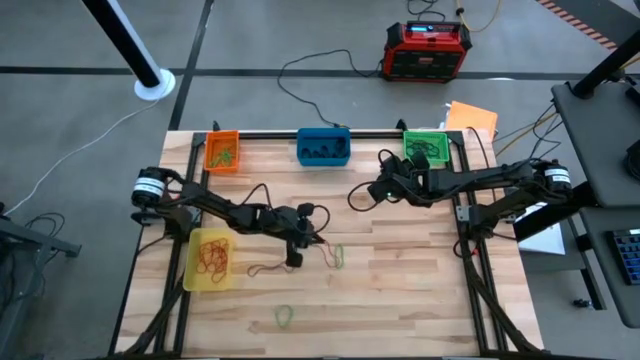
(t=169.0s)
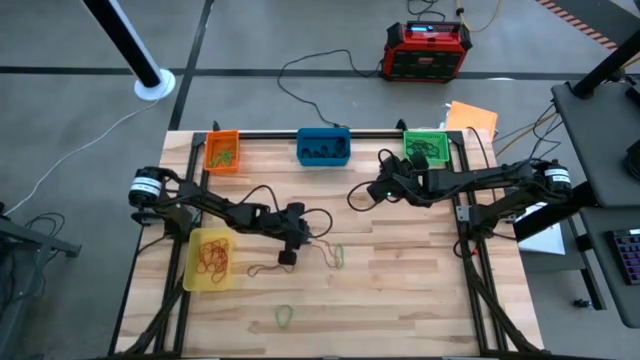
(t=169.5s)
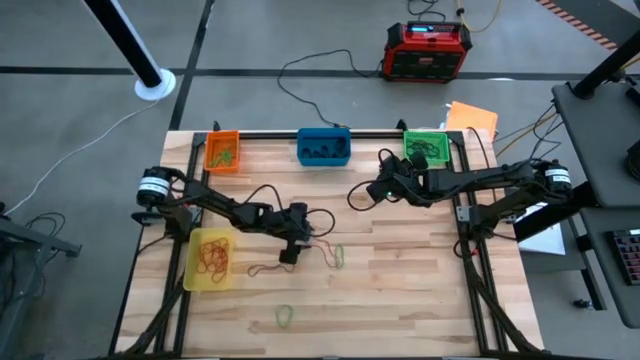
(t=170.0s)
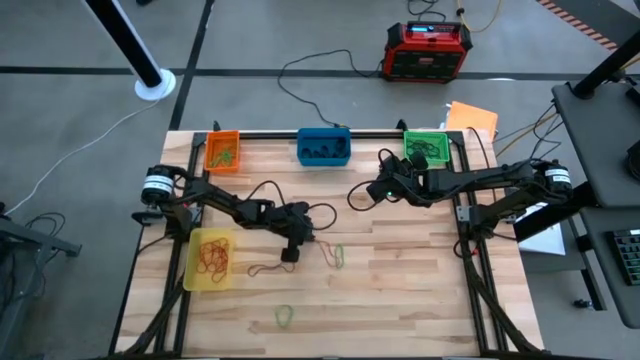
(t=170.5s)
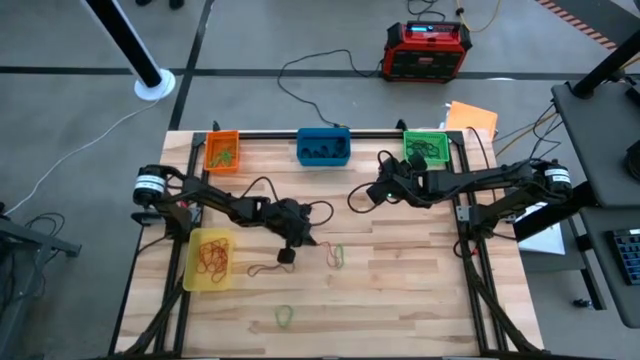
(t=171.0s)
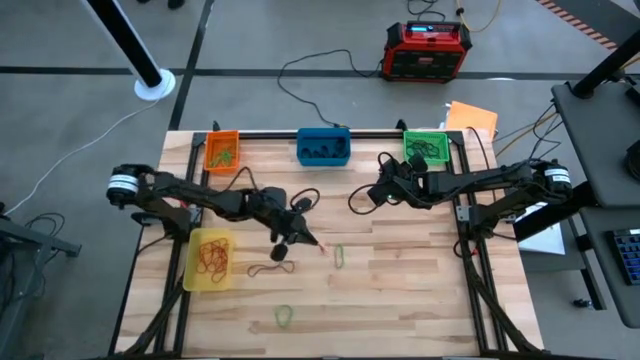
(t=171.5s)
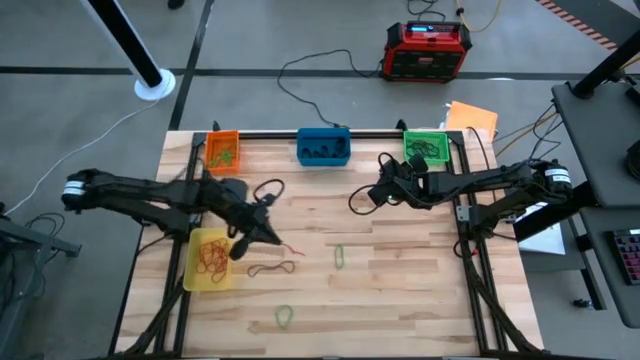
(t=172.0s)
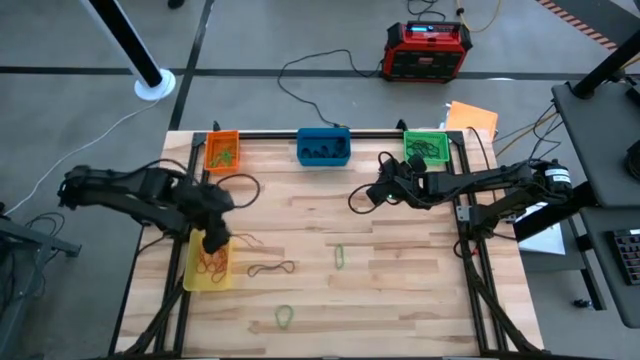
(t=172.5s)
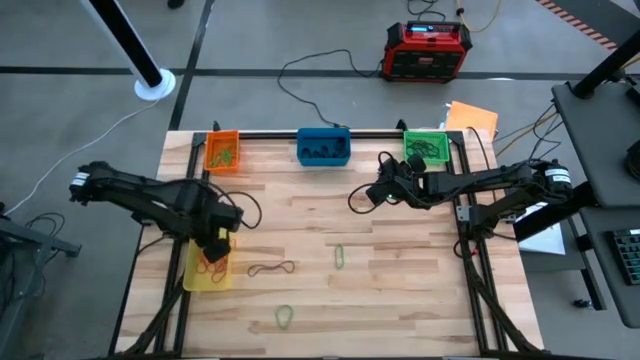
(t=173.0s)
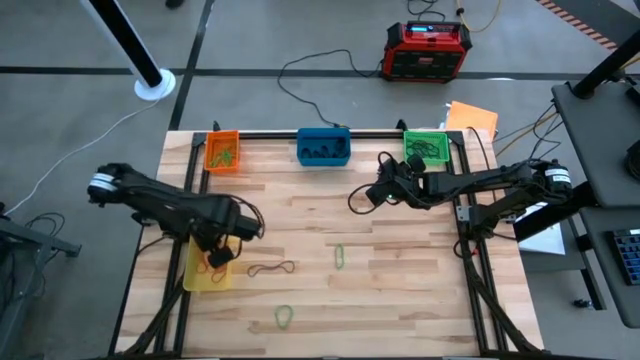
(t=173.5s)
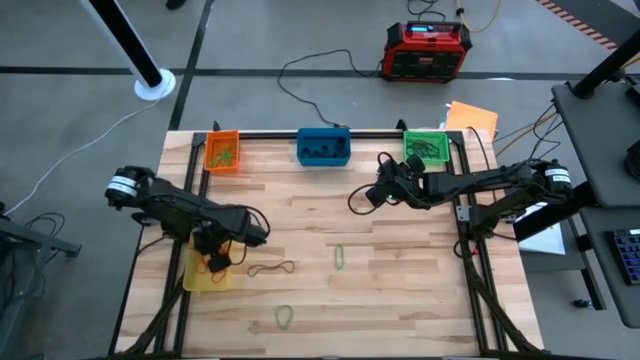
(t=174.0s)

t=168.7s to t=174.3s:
Task: Sort rubber bands into baskets
Put the red rubber band into the yellow bin

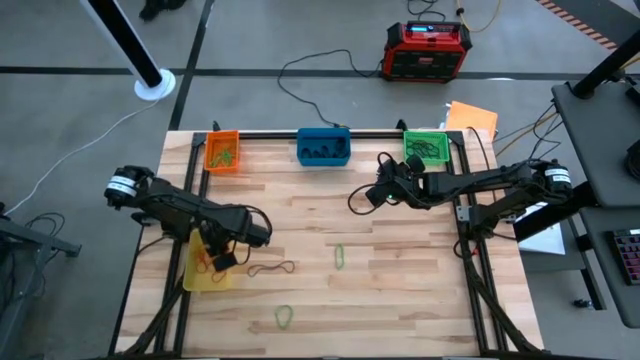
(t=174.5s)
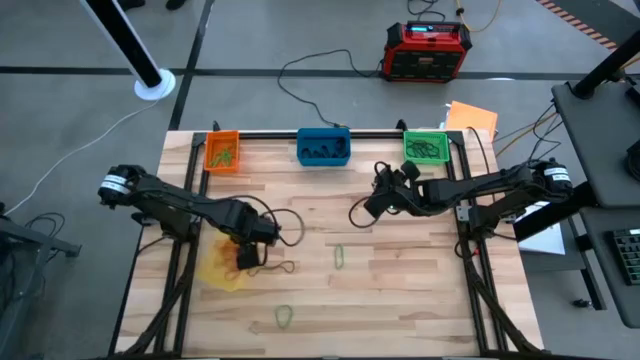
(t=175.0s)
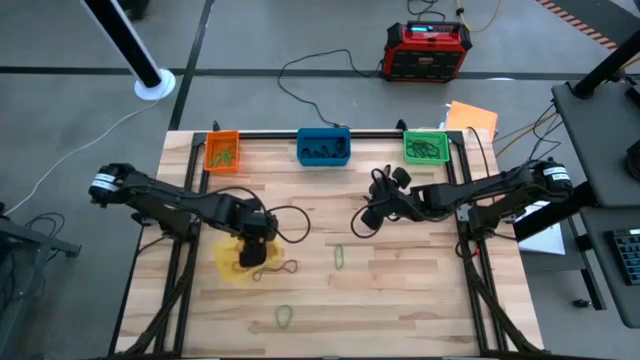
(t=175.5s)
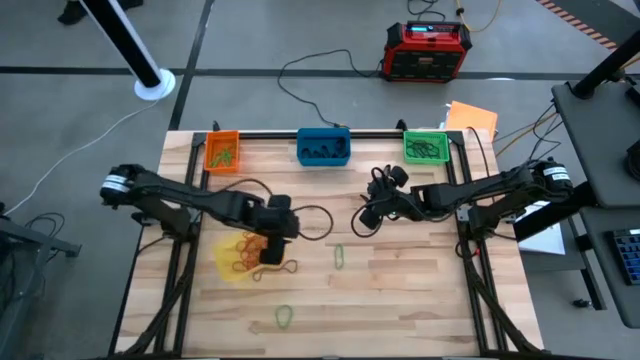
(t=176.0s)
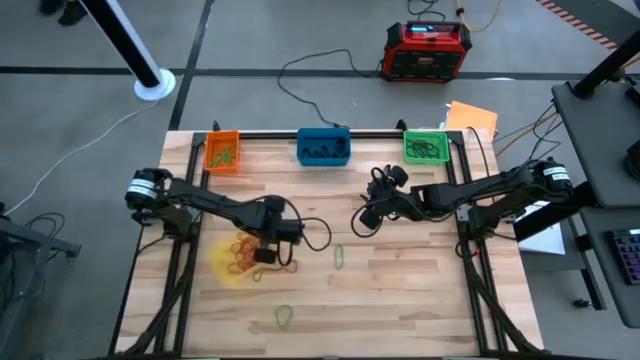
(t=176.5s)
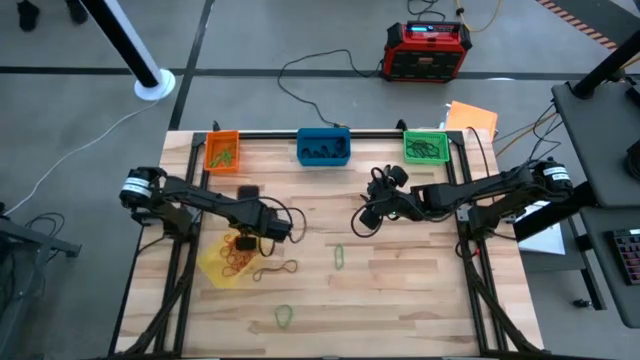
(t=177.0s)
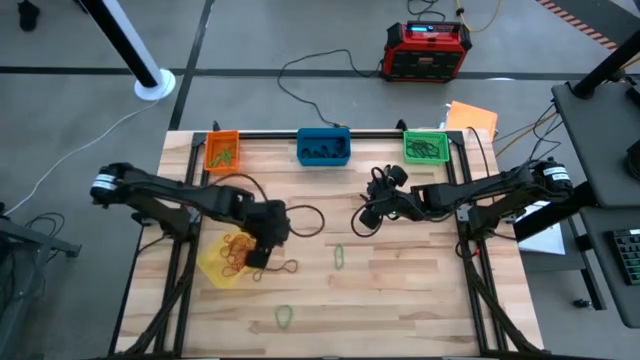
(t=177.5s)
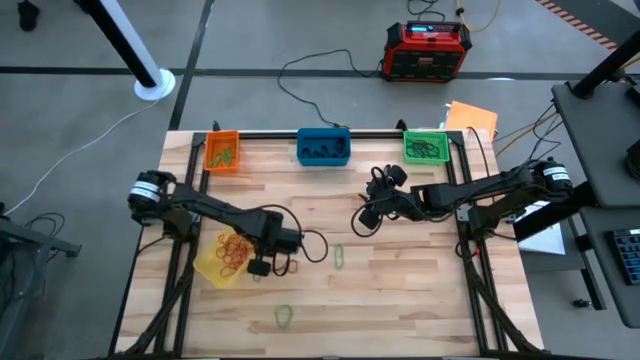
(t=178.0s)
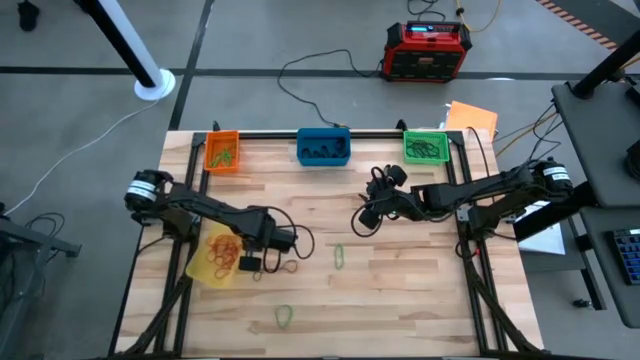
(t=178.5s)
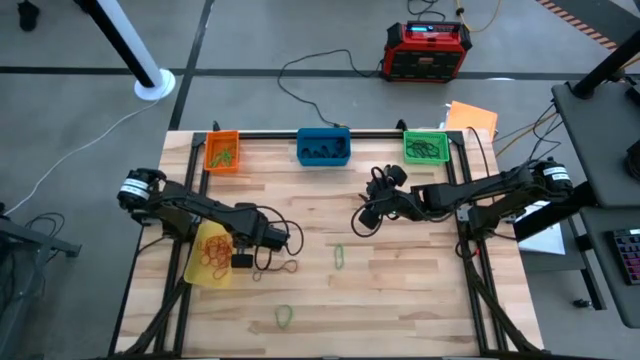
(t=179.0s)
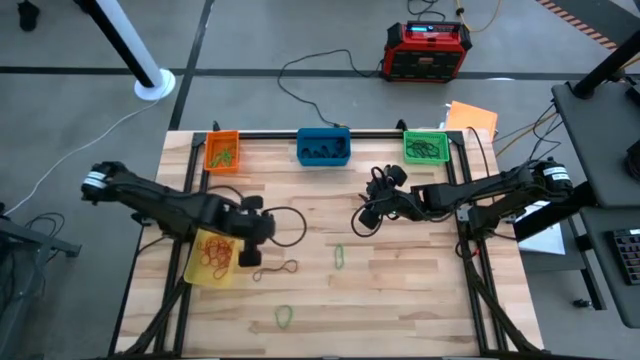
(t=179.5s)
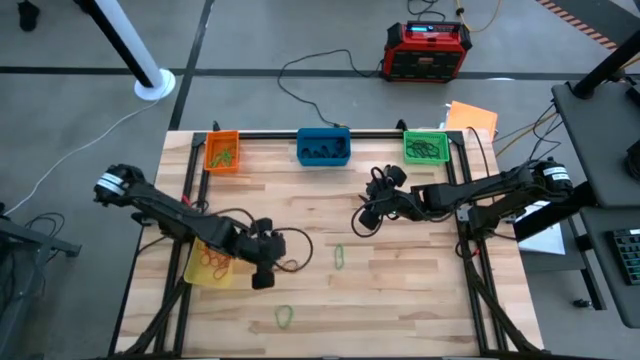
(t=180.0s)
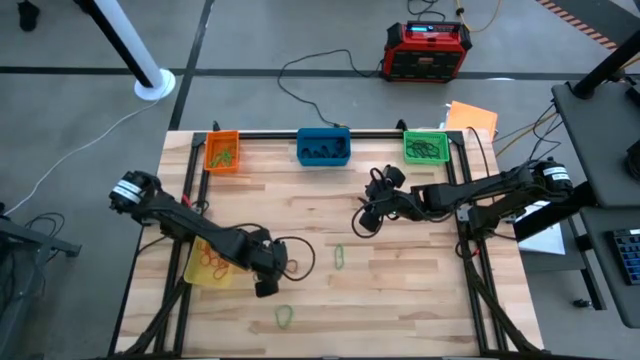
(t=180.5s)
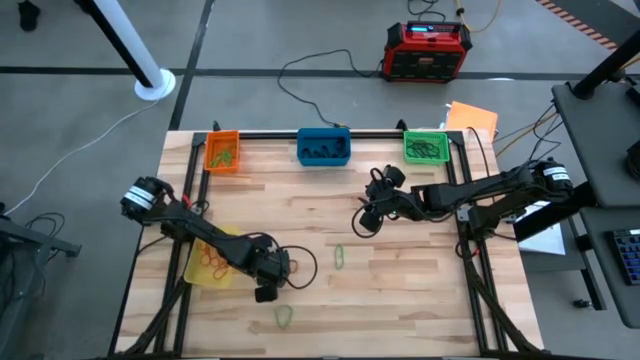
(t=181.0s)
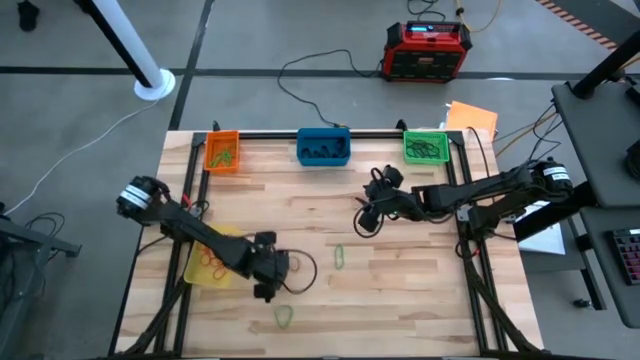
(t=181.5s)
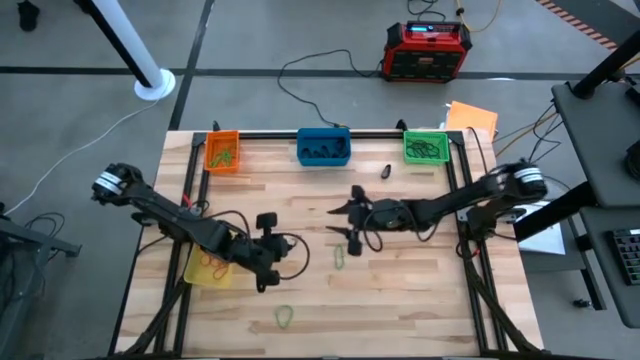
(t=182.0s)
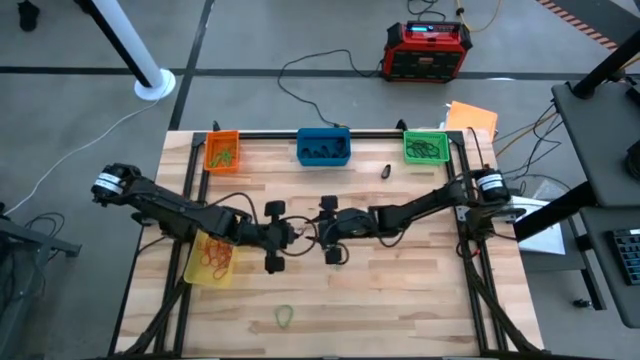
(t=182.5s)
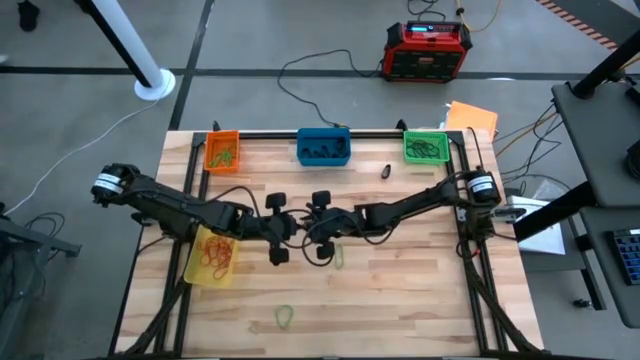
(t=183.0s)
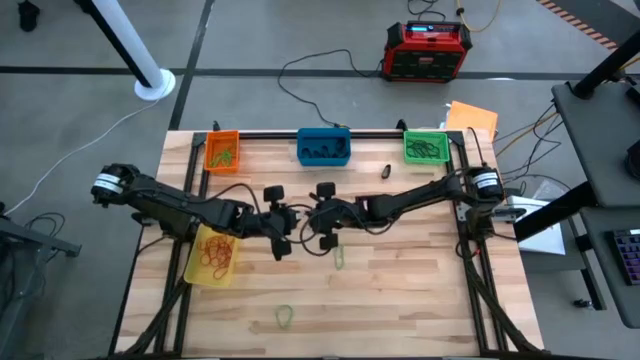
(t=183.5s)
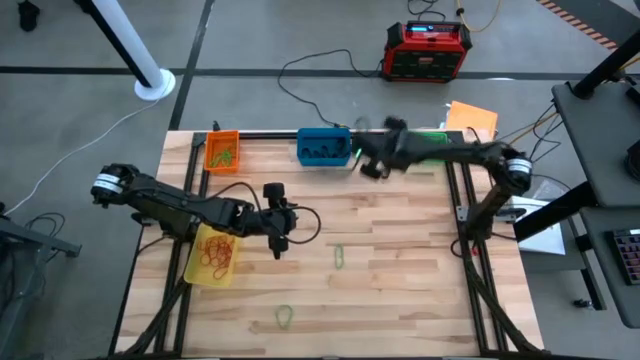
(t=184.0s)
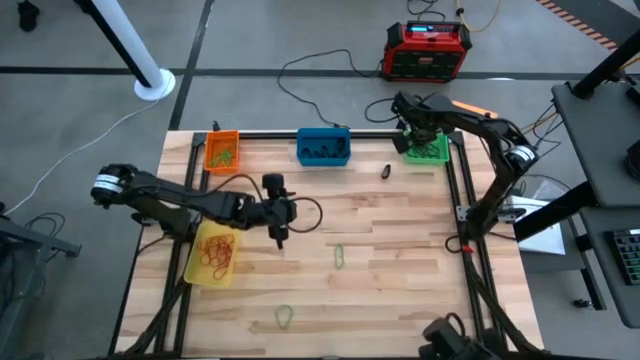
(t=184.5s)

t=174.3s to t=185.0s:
Put the violet rubber band into the green bin

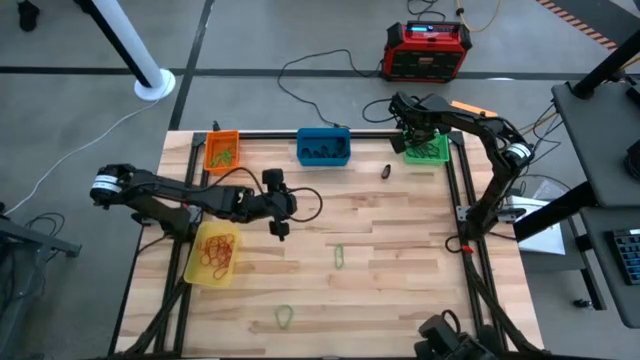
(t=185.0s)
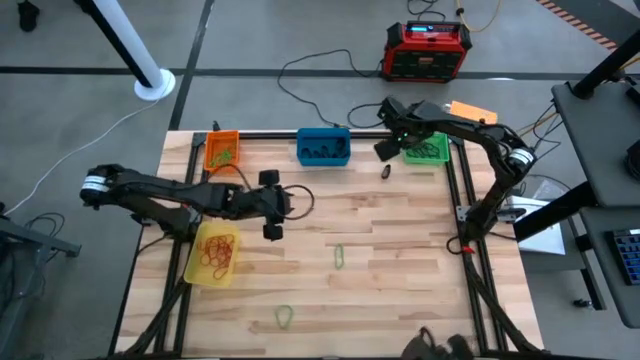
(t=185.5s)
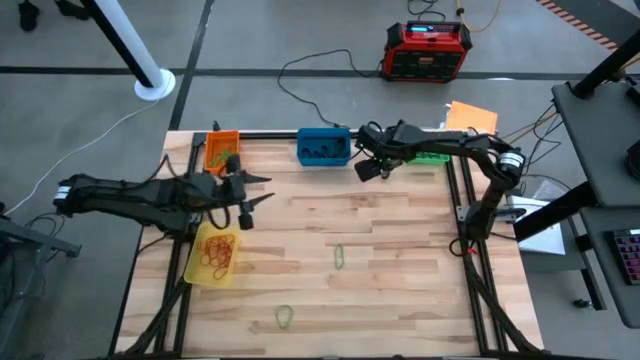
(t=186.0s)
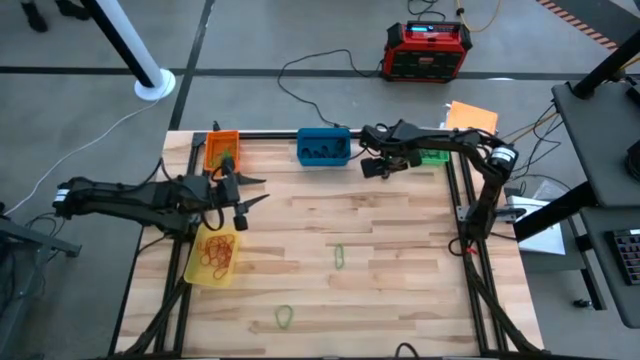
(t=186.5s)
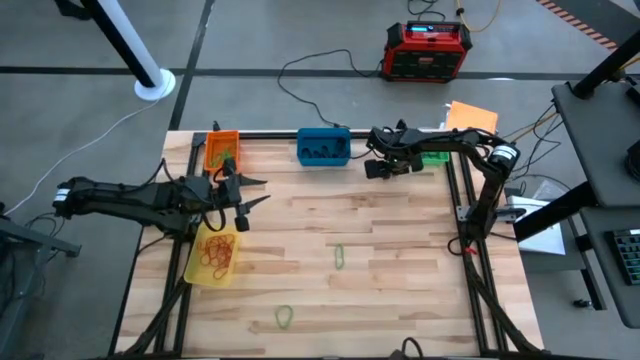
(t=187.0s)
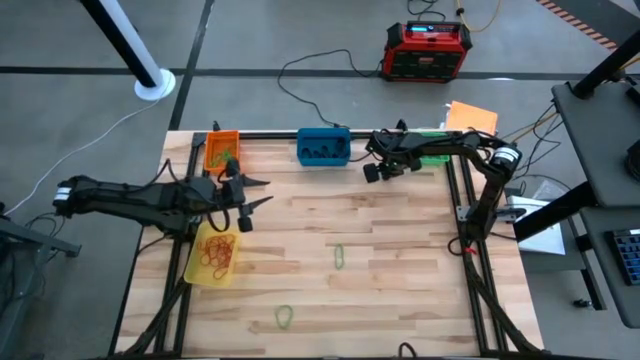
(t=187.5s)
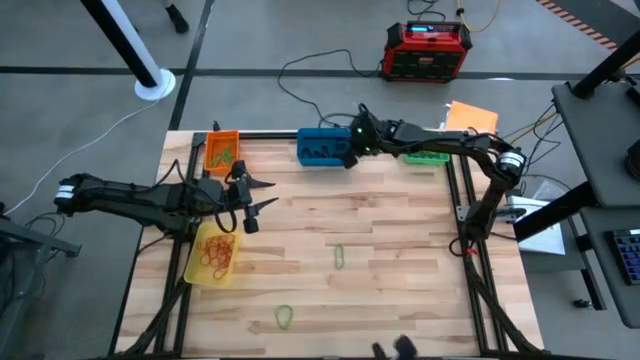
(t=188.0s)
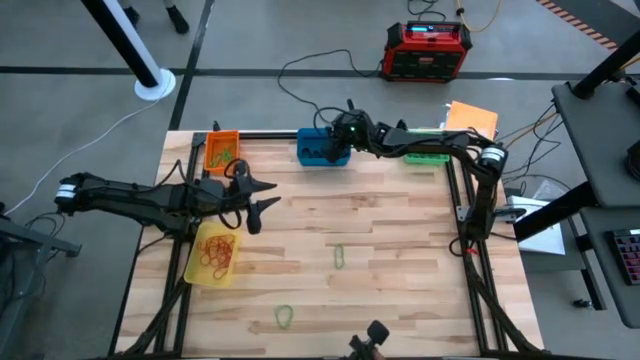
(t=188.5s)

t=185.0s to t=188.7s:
Put the black rubber band into the blue bin
